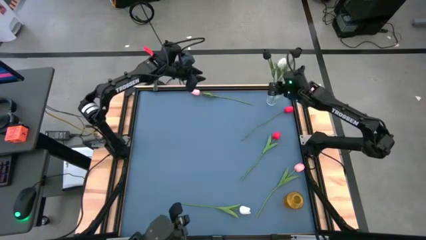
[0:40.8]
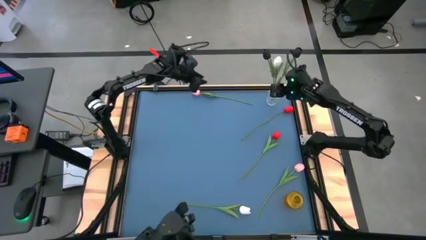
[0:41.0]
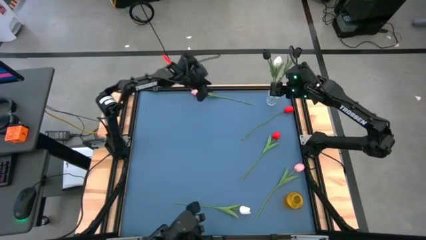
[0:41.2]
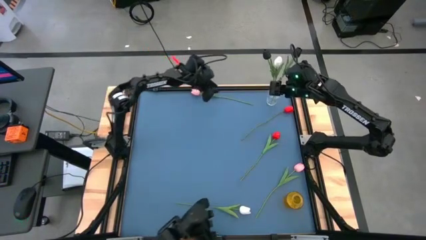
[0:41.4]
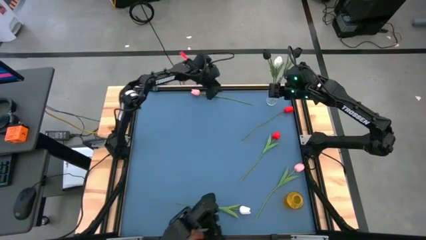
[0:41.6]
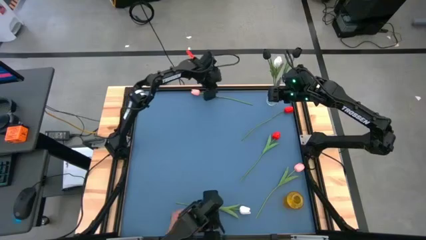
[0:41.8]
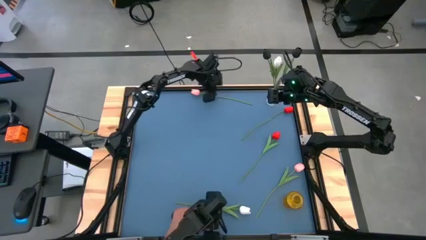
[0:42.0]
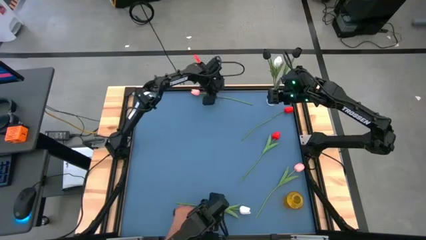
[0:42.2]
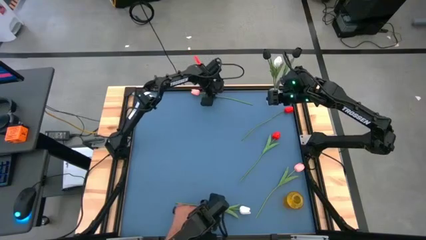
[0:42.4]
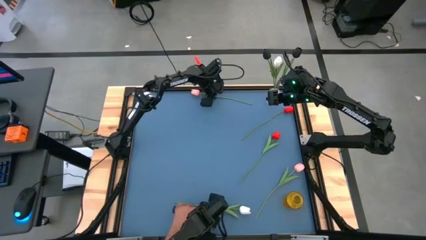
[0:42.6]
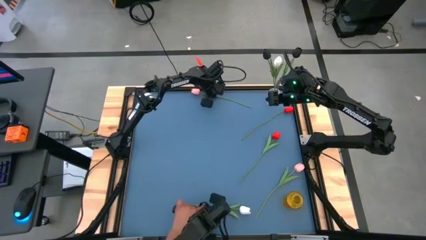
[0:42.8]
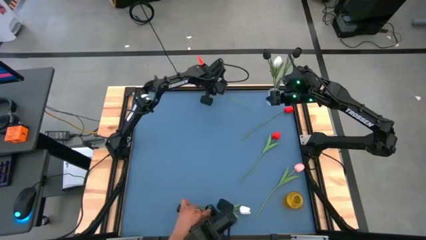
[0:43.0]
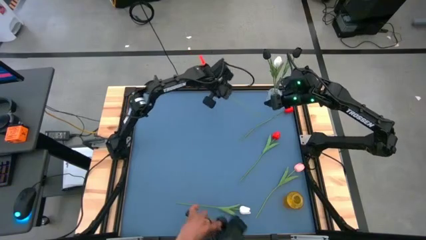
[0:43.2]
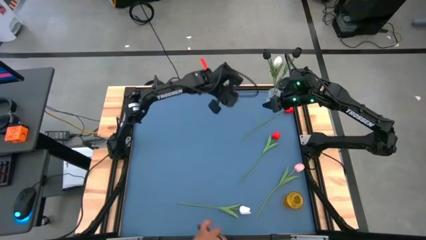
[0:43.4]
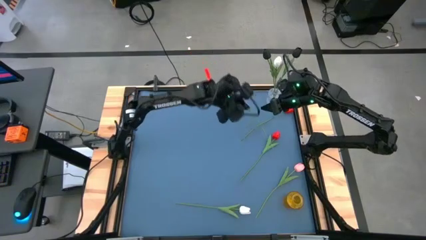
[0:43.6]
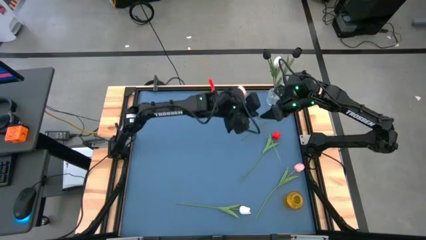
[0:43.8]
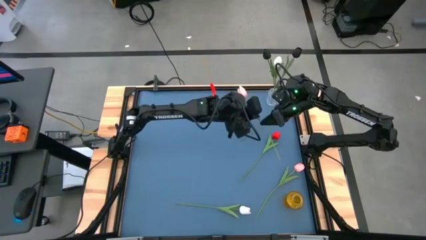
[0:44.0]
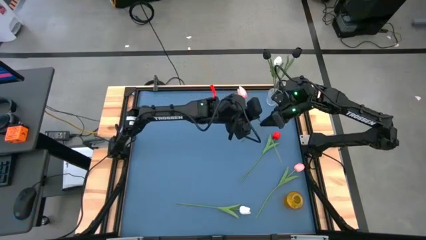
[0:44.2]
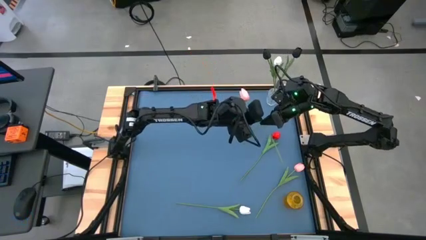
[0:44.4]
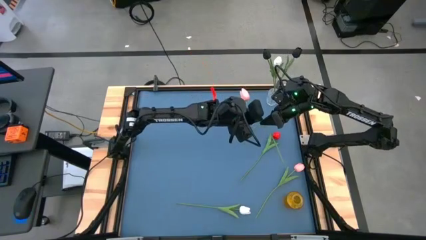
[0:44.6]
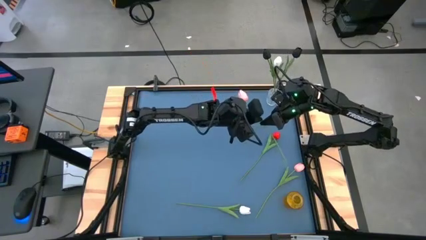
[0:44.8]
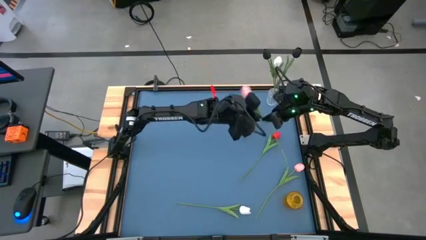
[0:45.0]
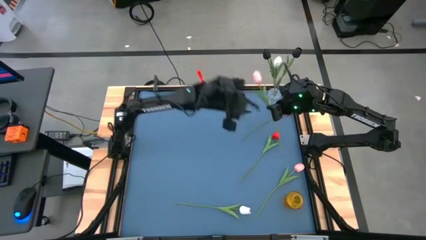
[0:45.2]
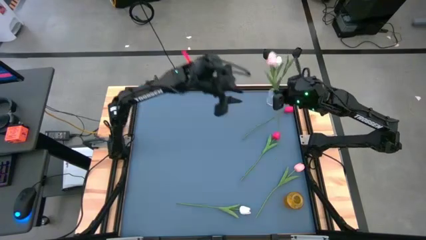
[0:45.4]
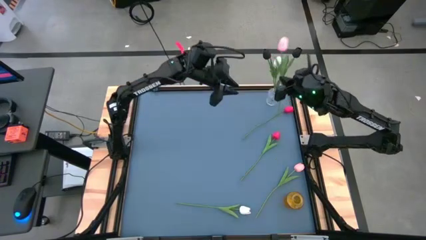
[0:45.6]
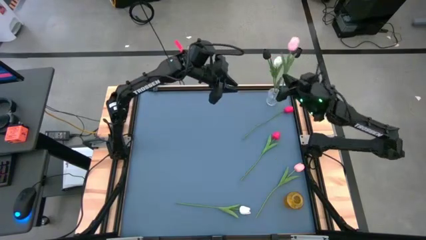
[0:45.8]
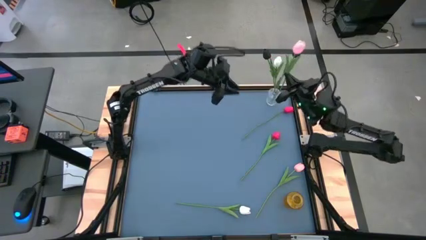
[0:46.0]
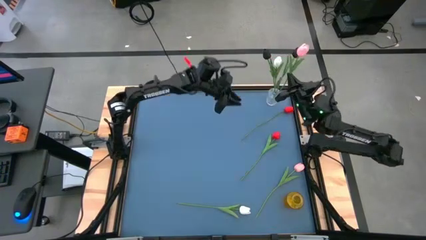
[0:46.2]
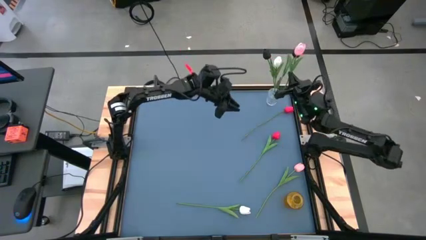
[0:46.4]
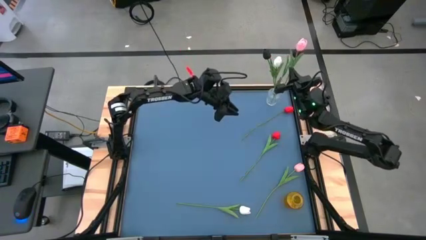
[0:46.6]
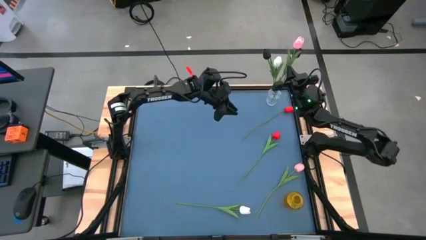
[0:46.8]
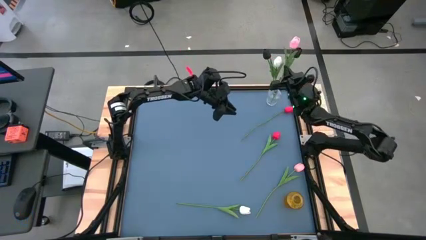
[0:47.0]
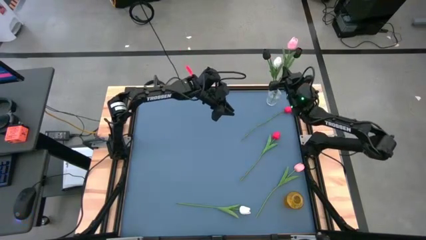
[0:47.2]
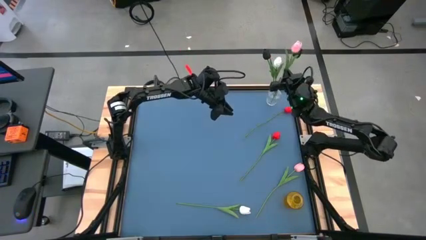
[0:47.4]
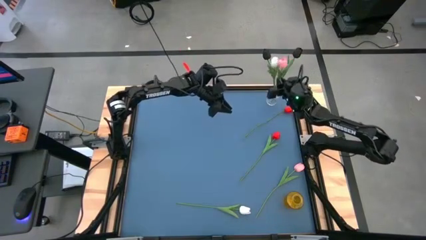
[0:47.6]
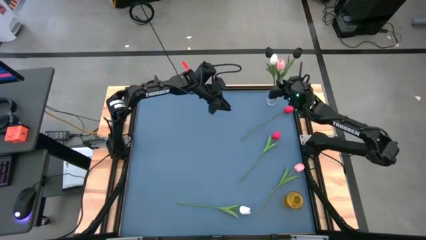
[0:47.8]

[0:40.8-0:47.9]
Task: Sort flowers into vase by color
Put the top pink flower into the transparent vase

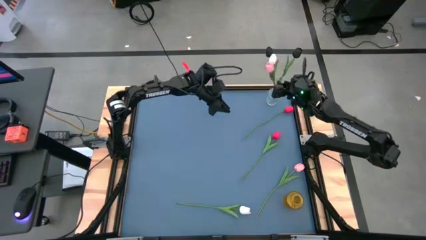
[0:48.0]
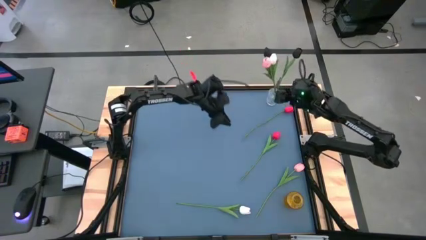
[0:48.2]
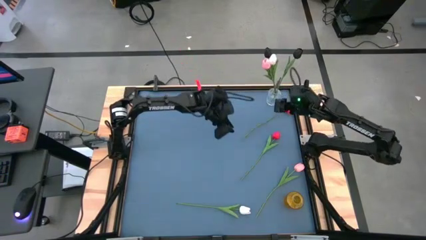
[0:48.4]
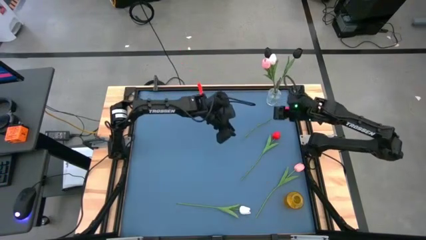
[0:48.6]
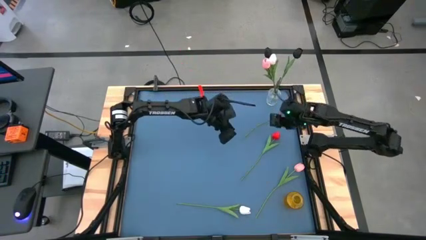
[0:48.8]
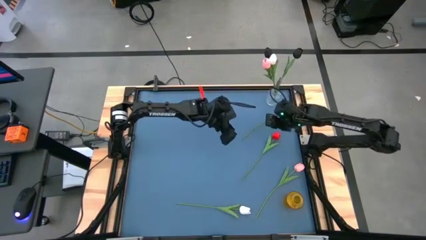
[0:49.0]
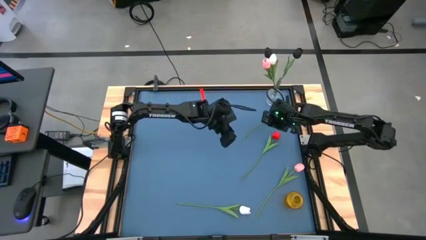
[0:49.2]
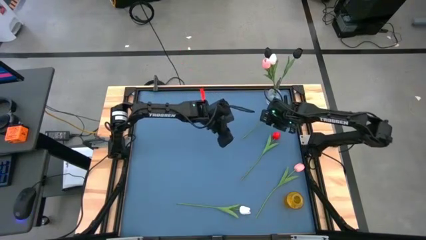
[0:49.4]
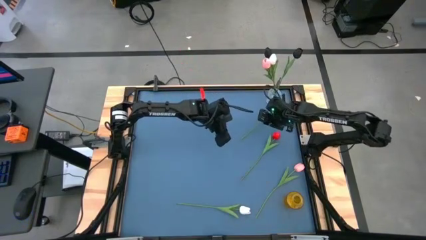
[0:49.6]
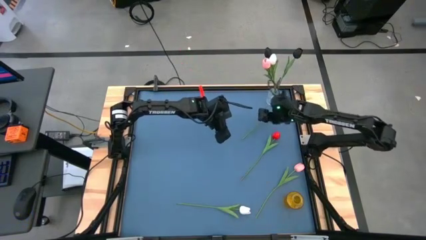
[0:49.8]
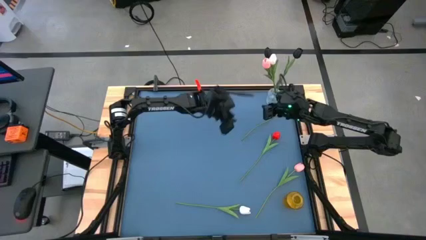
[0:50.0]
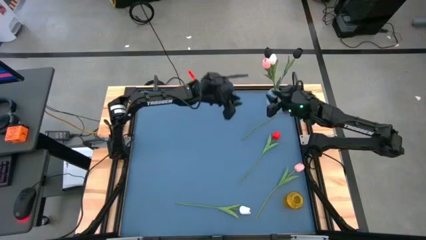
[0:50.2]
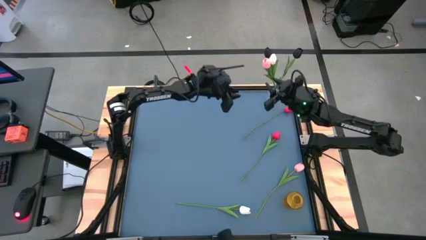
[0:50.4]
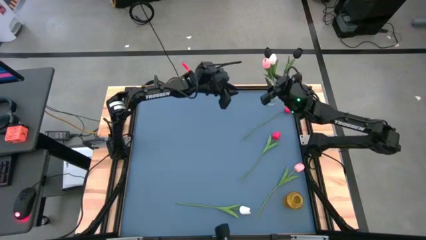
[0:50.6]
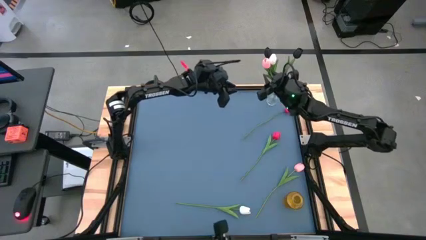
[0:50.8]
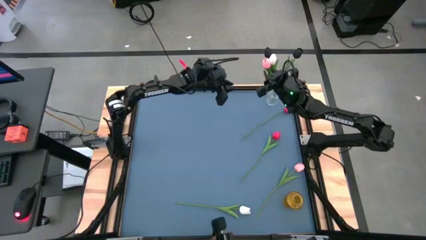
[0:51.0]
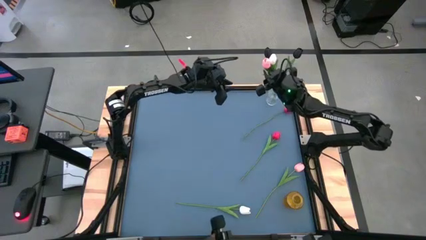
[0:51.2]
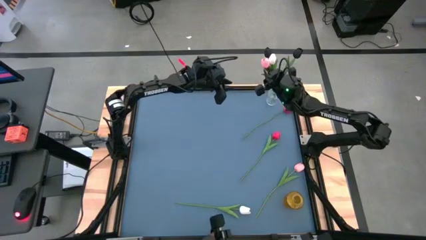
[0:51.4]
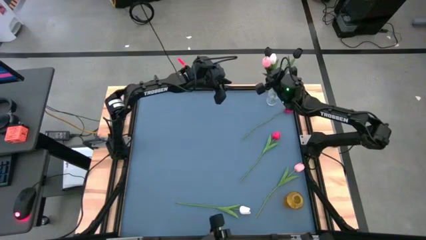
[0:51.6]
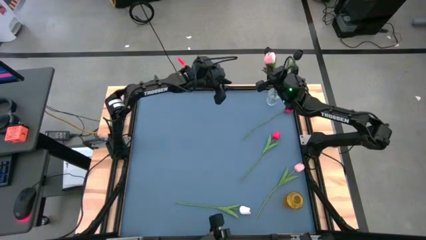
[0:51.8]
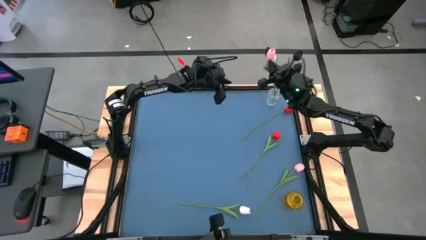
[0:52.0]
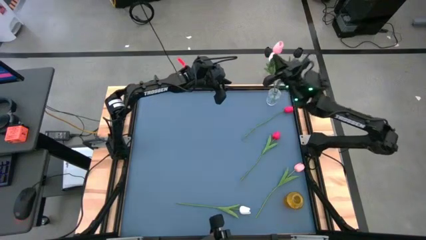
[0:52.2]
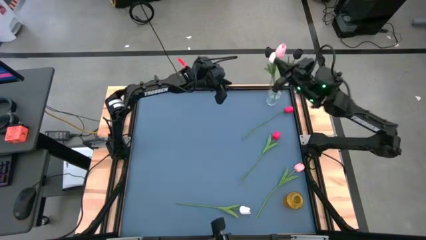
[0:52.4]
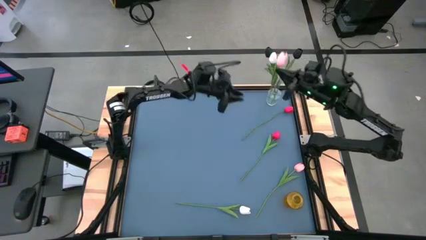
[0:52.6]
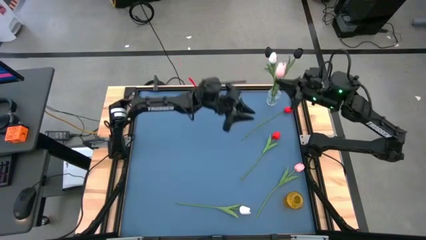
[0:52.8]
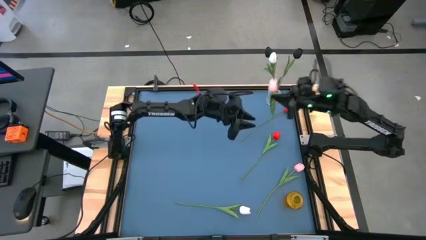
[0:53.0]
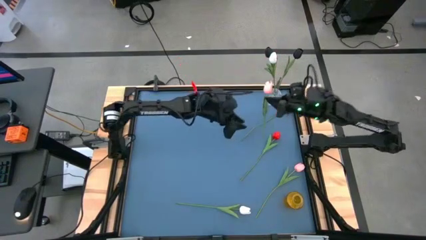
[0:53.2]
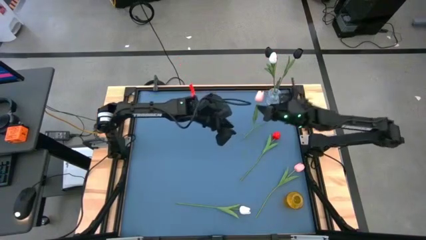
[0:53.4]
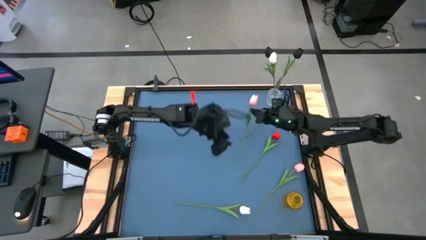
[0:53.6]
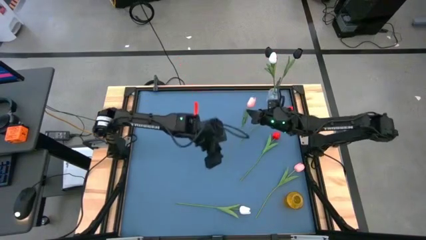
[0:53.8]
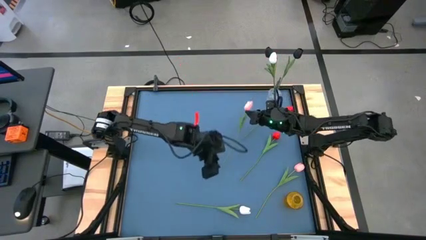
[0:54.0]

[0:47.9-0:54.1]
Remove the pink flower from the transparent vase
